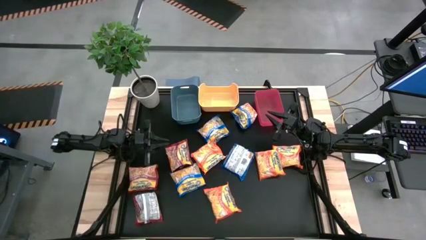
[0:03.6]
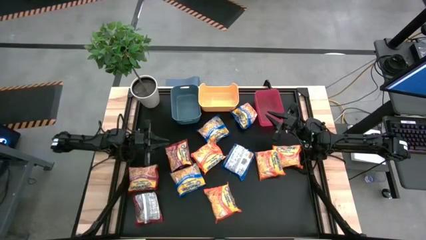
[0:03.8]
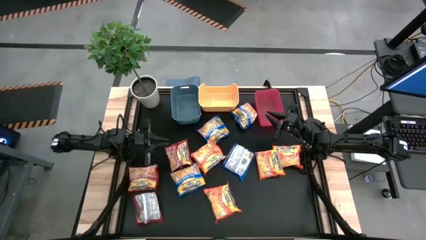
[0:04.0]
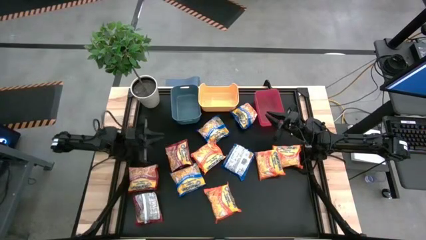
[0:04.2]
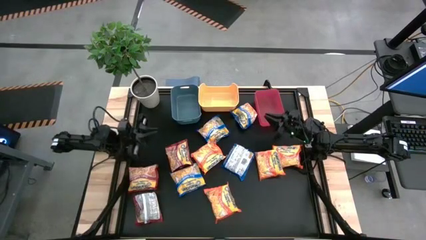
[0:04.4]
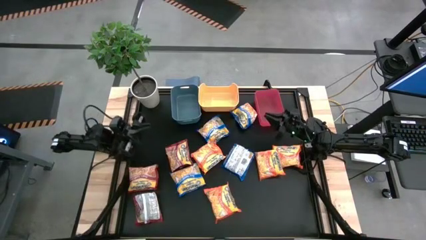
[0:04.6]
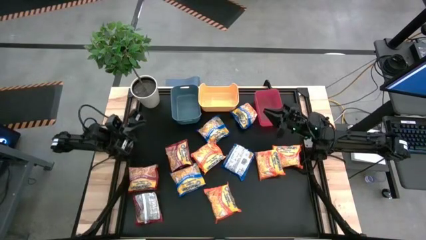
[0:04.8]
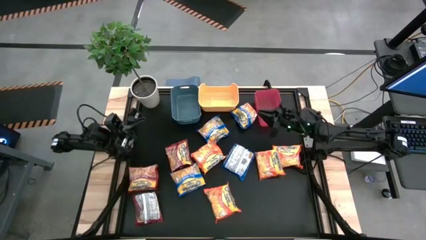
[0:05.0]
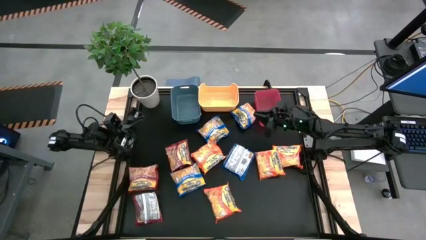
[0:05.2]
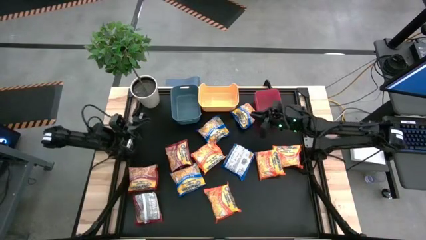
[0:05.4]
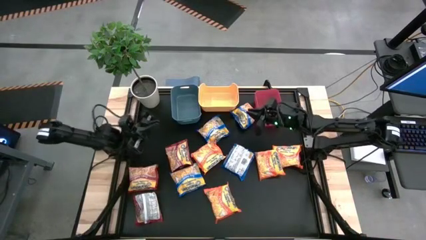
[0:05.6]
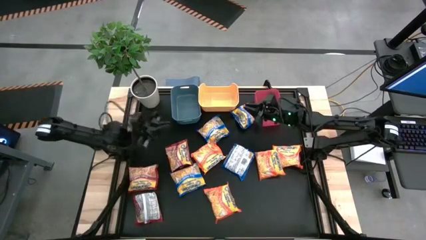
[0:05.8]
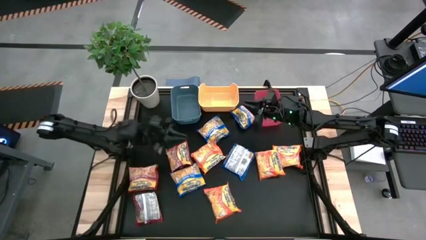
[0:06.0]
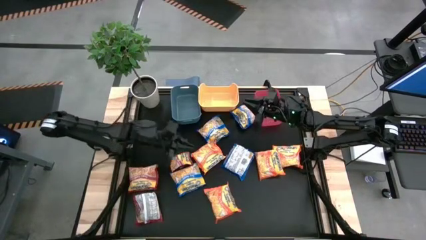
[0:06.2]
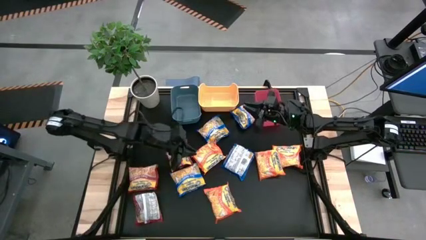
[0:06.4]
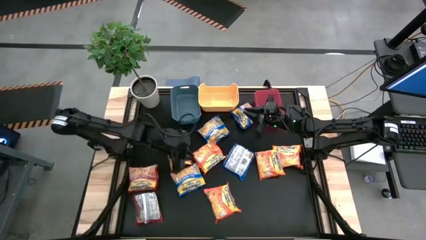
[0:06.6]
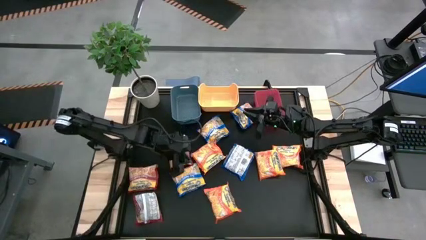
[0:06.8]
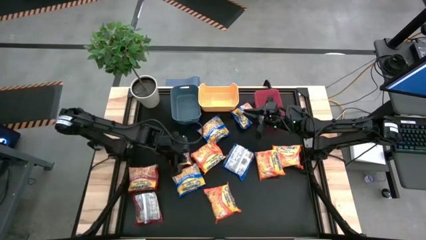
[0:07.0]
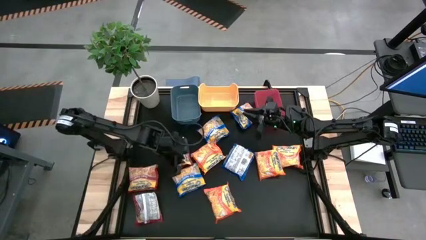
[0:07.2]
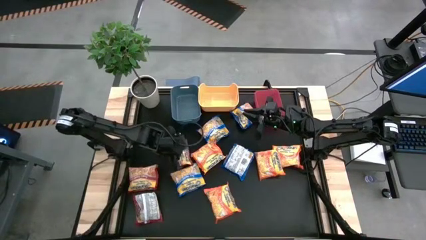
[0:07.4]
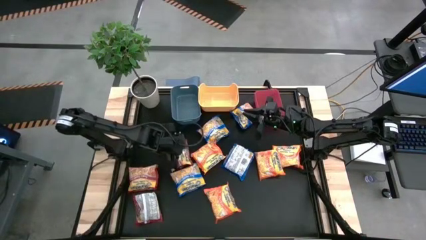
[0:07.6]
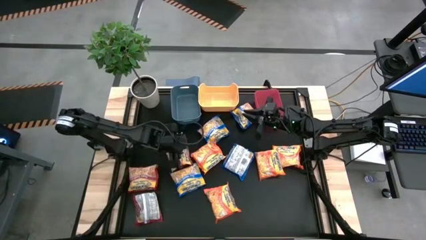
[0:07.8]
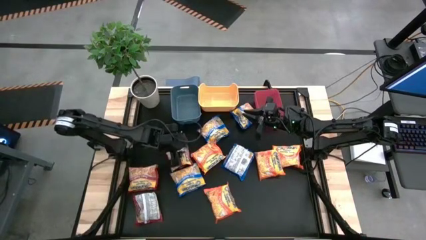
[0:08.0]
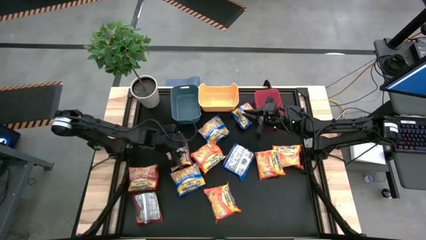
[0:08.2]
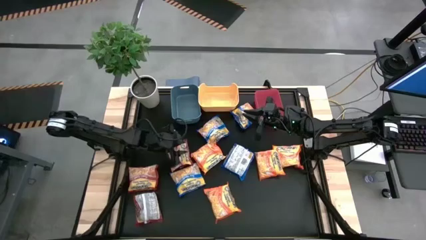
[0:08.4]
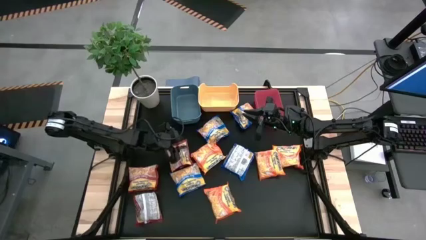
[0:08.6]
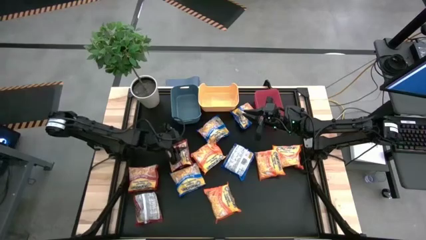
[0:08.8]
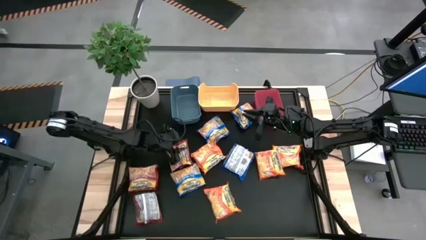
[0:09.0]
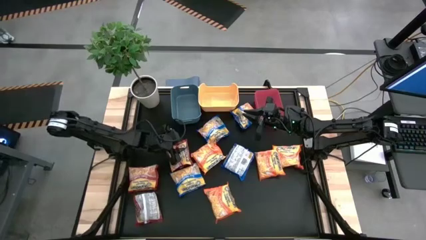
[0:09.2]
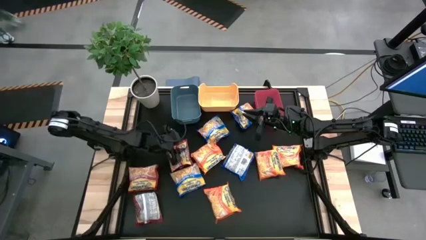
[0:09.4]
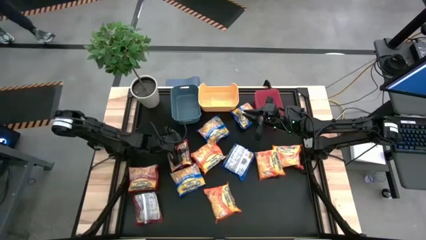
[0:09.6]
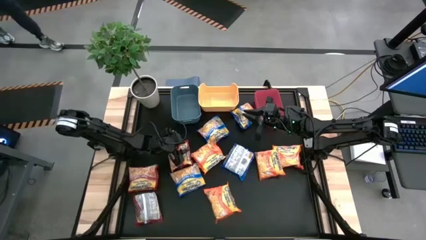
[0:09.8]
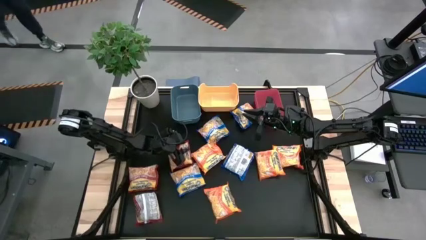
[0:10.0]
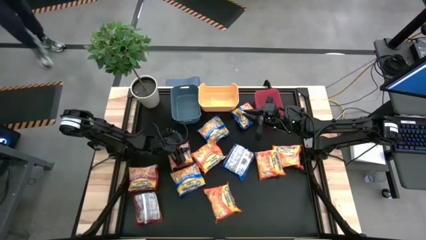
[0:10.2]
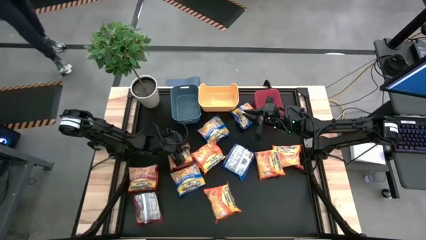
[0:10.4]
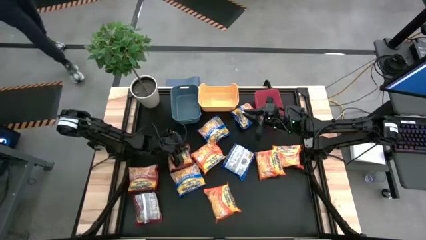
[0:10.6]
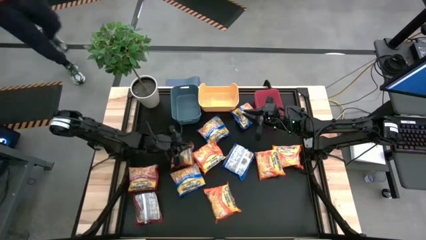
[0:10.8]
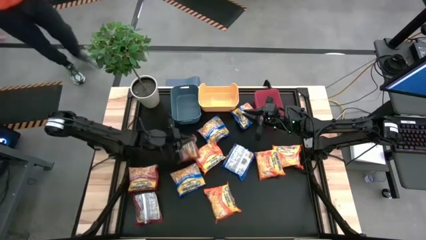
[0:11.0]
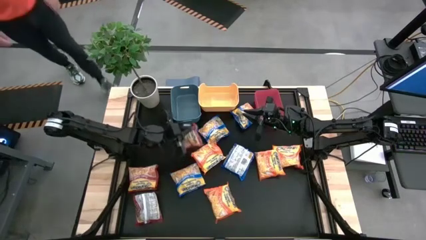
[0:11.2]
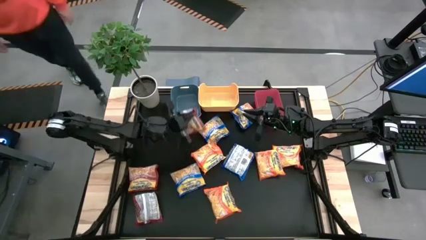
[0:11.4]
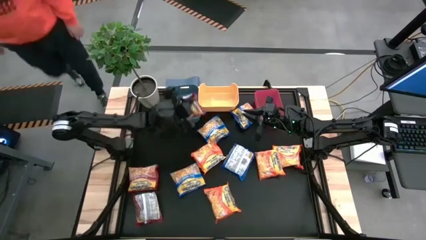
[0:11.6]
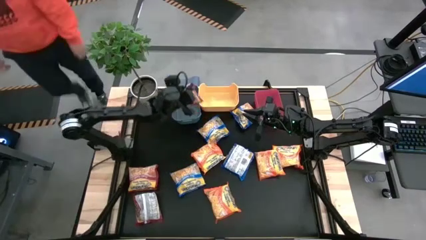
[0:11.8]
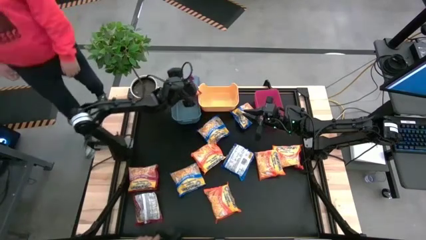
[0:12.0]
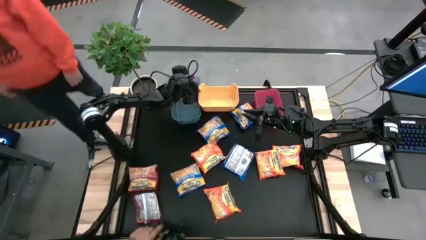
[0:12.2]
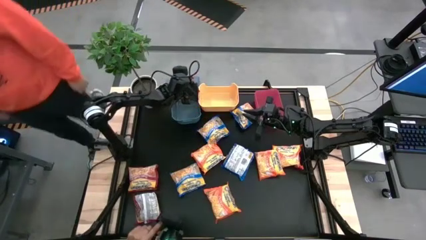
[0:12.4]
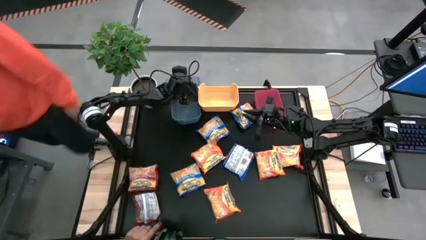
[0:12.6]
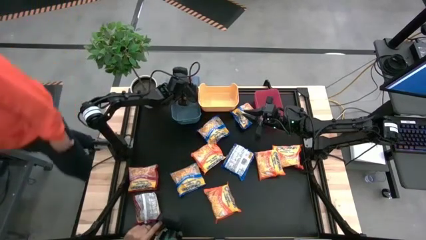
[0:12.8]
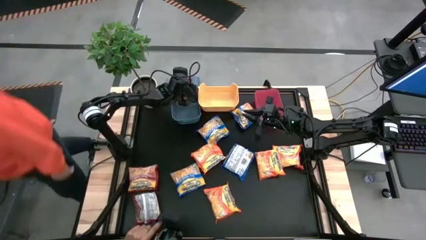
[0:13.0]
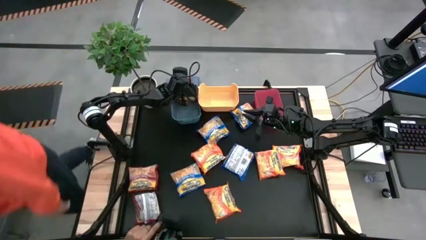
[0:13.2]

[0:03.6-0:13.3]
Task: Sort Maruchan noodles
Put the red noodle pack into the blue bin

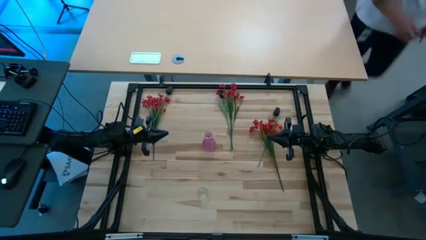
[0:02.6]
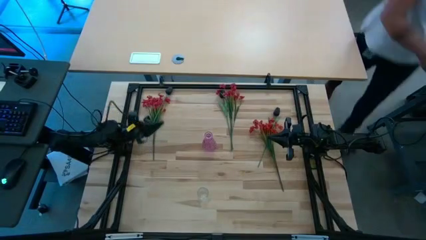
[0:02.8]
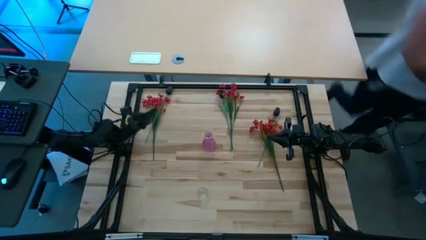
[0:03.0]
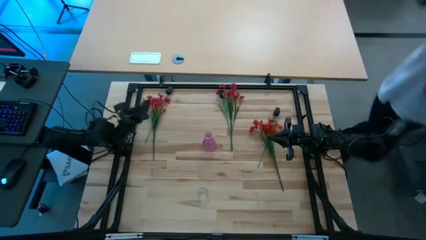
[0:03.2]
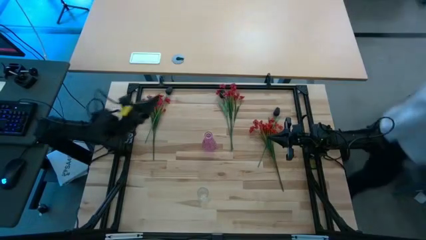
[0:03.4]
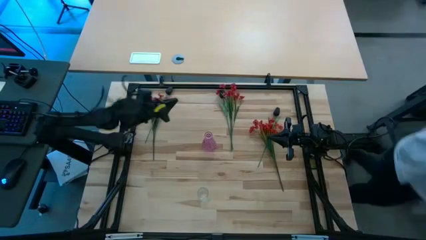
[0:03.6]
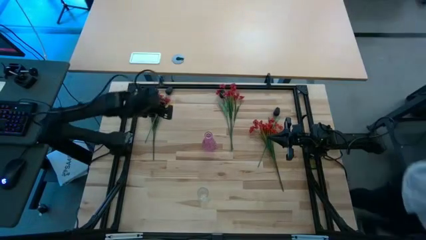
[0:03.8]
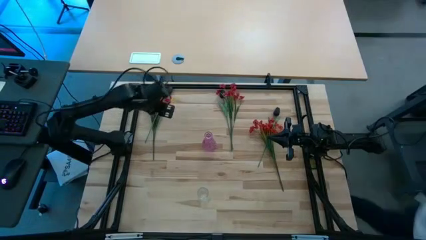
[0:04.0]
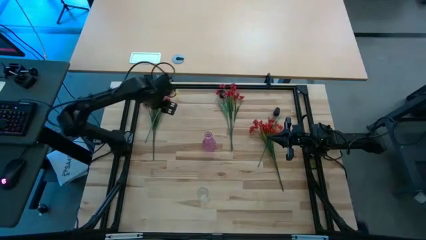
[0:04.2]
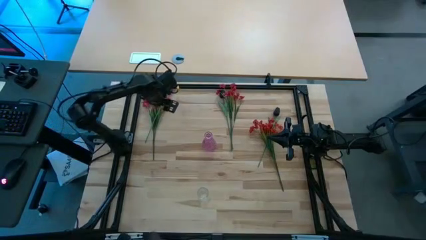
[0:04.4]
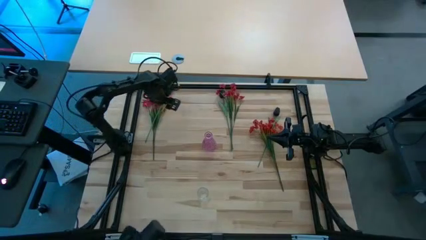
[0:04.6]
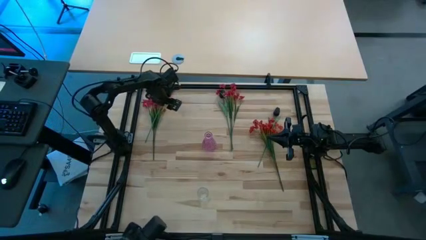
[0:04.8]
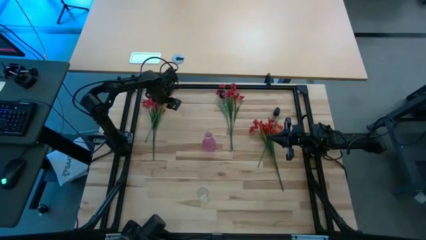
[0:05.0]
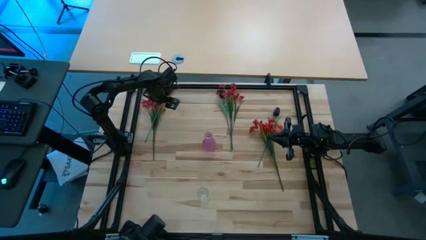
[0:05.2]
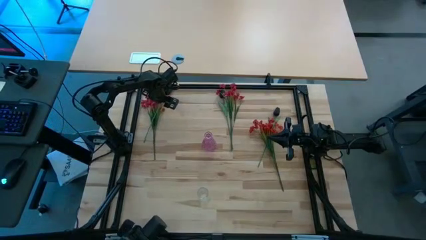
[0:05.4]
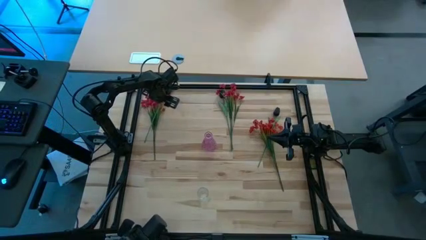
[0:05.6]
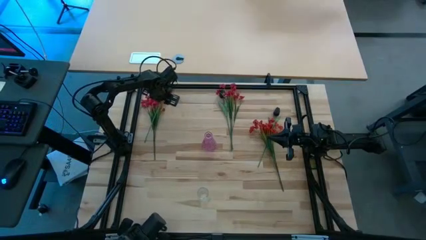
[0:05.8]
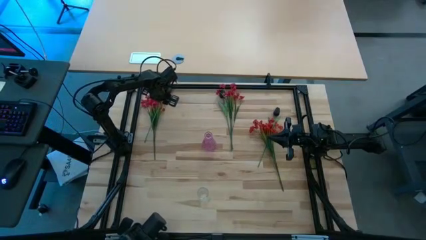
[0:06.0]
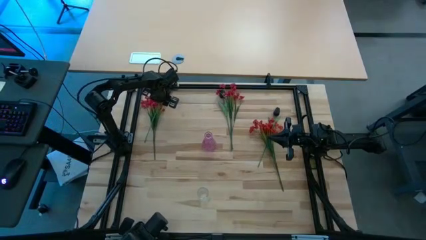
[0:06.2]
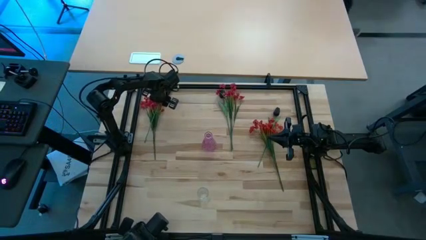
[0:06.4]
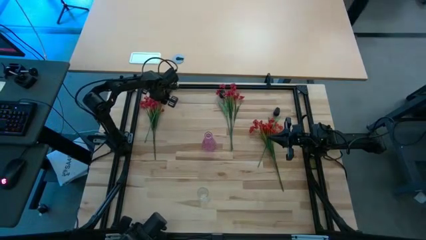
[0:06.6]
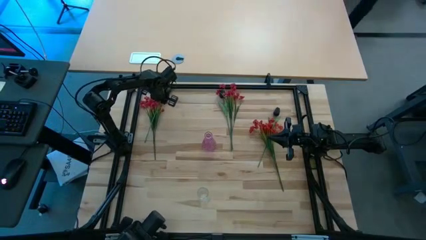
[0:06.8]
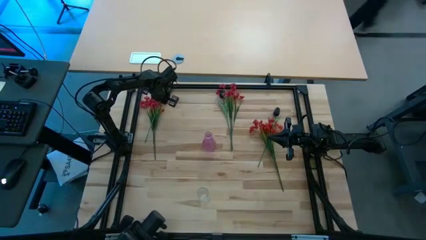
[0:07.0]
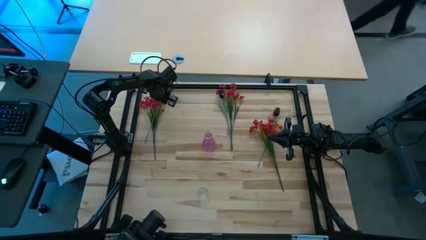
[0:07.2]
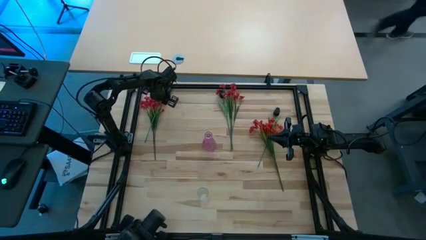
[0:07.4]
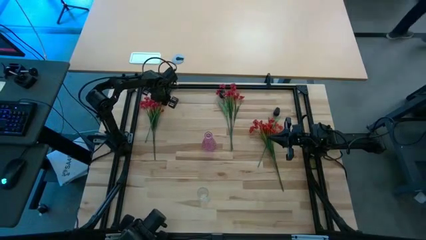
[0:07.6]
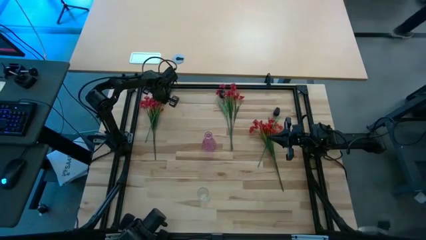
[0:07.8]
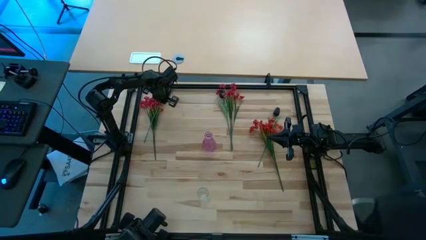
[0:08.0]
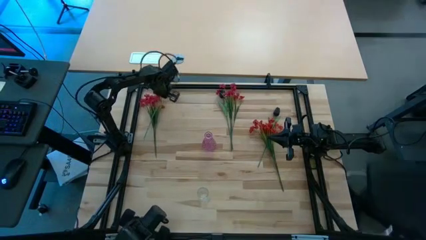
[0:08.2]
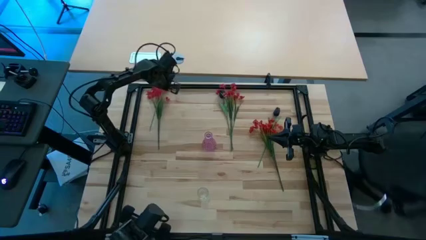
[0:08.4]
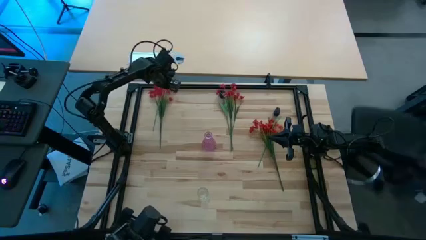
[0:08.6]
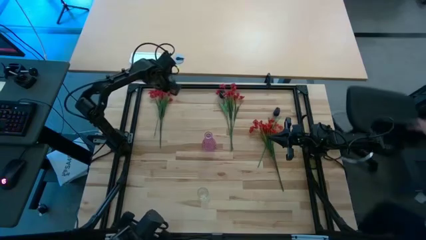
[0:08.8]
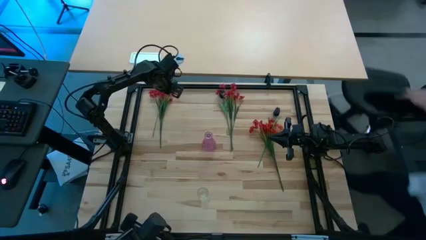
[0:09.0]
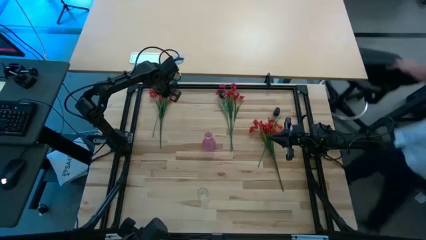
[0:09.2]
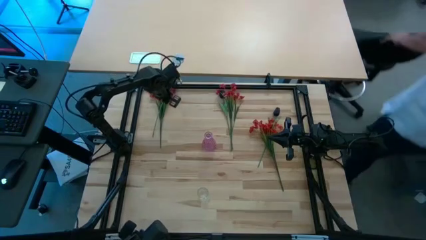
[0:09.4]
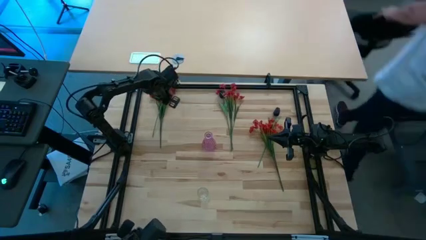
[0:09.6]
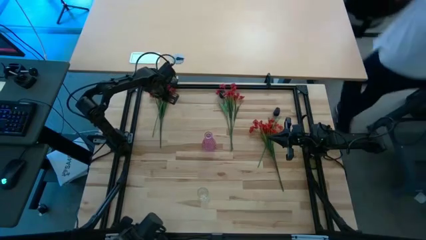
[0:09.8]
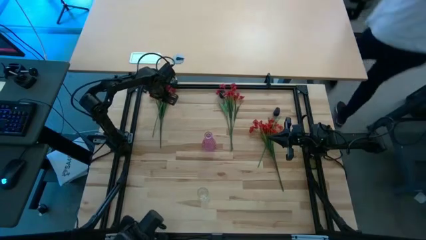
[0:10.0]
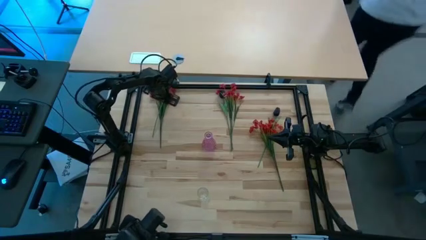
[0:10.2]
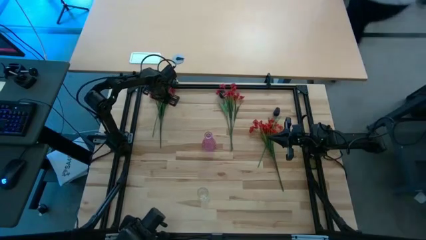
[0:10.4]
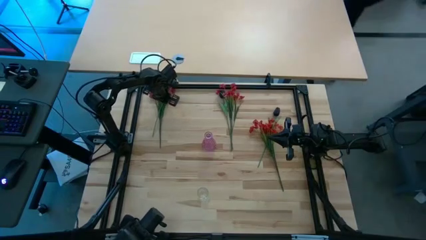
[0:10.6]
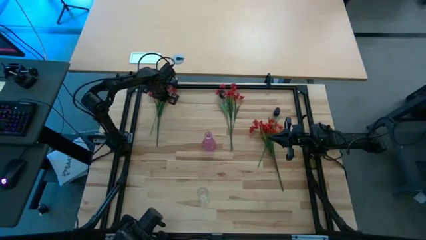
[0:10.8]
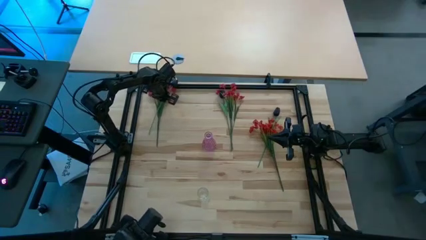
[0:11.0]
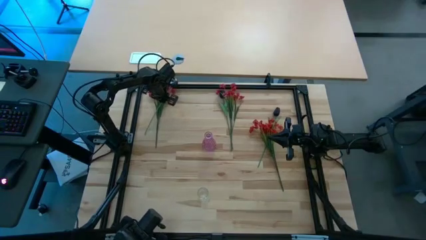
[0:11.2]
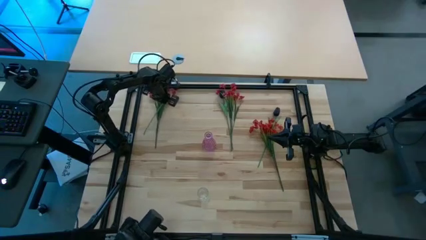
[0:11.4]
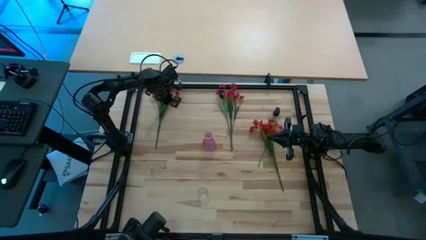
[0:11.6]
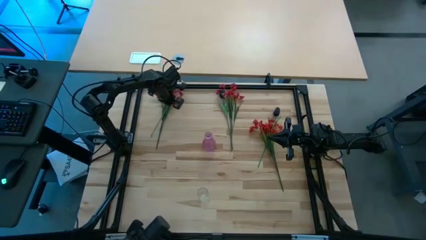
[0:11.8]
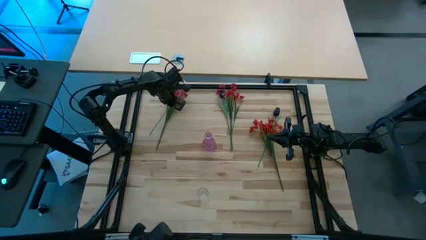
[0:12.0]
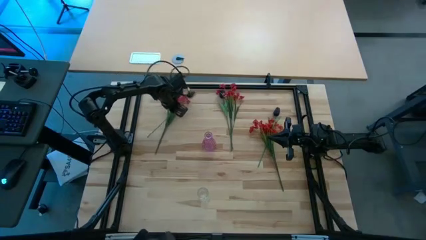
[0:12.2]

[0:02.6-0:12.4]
Task: Sort flowers into vase by color
Put the top left black tulip into the pink vase
